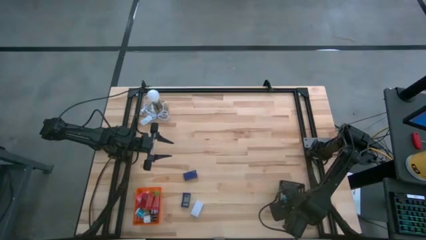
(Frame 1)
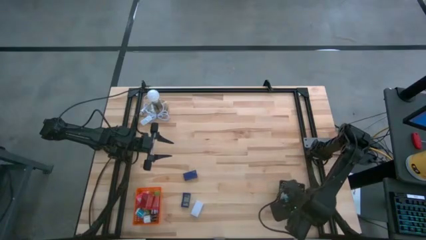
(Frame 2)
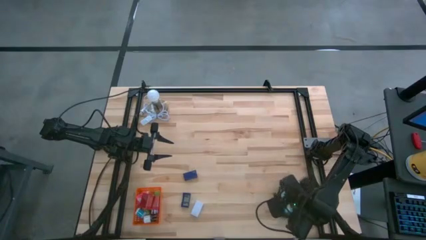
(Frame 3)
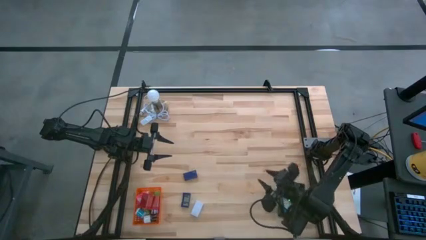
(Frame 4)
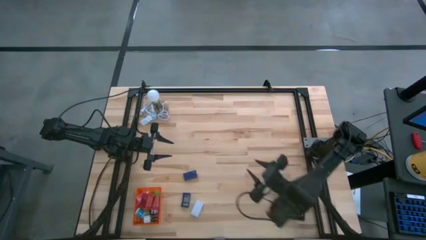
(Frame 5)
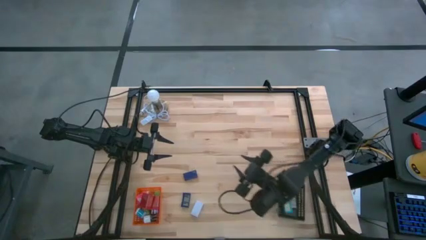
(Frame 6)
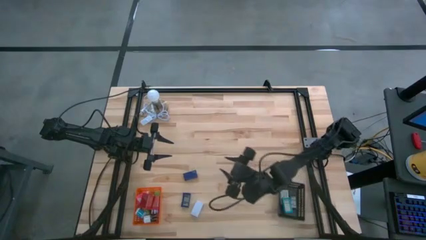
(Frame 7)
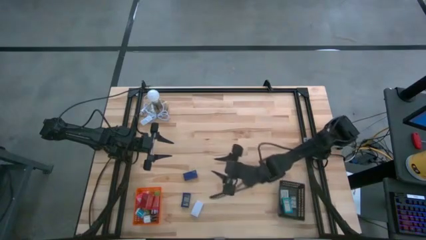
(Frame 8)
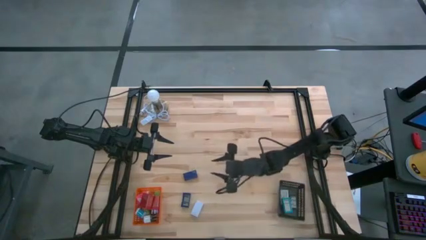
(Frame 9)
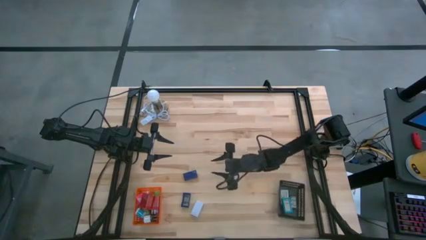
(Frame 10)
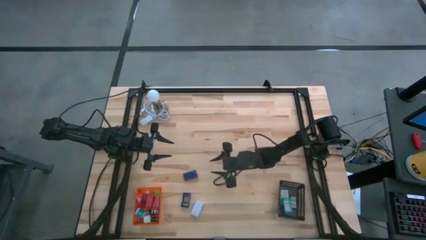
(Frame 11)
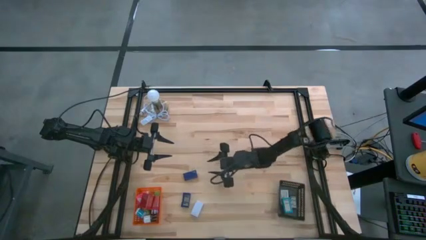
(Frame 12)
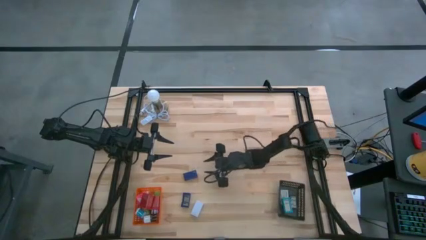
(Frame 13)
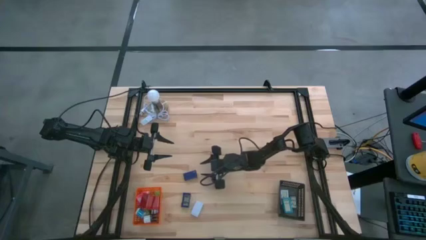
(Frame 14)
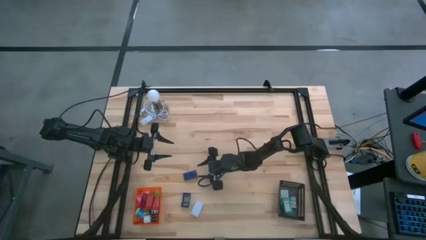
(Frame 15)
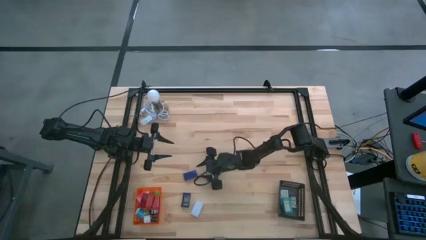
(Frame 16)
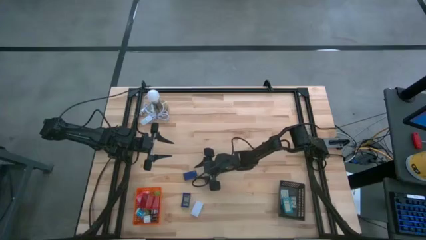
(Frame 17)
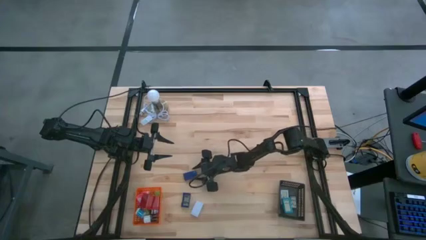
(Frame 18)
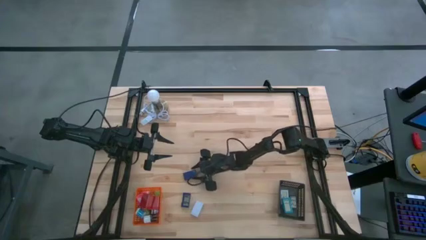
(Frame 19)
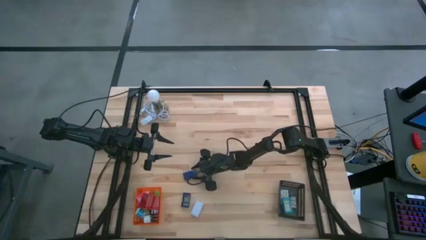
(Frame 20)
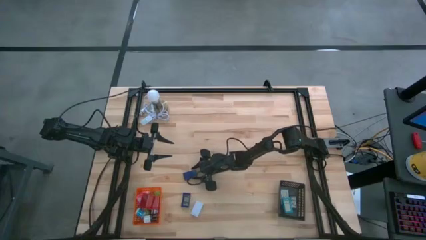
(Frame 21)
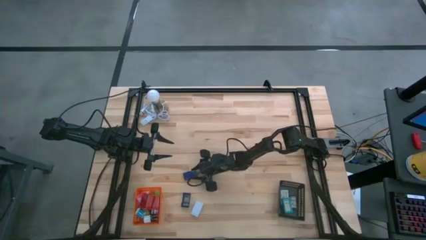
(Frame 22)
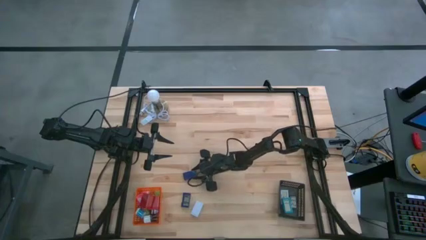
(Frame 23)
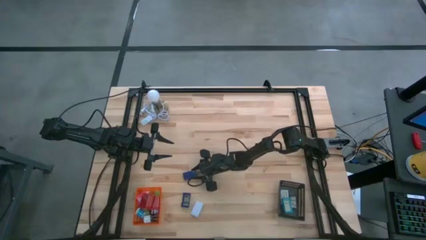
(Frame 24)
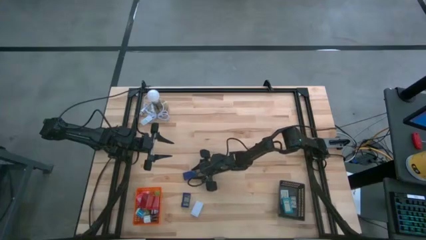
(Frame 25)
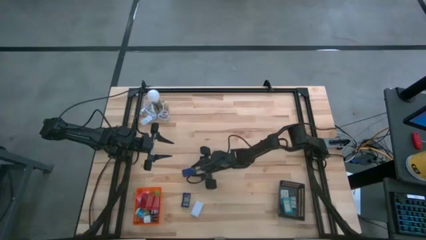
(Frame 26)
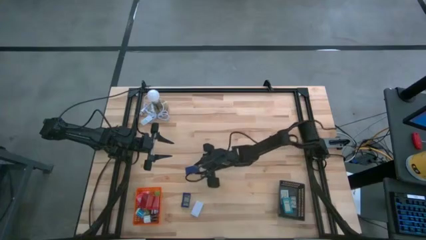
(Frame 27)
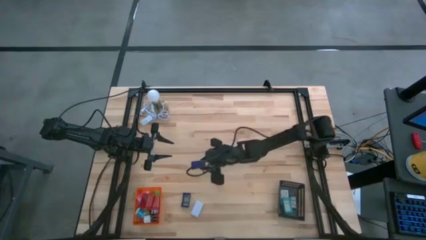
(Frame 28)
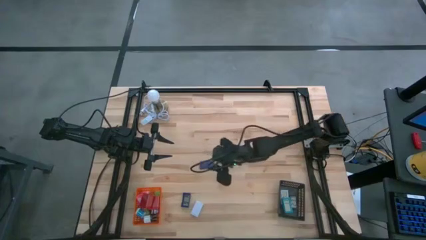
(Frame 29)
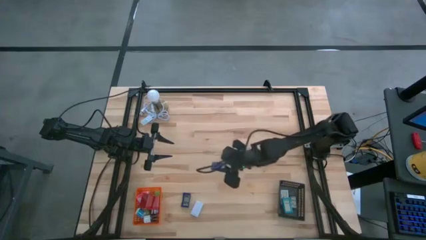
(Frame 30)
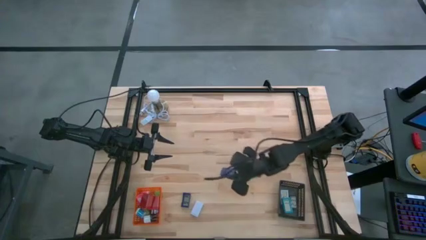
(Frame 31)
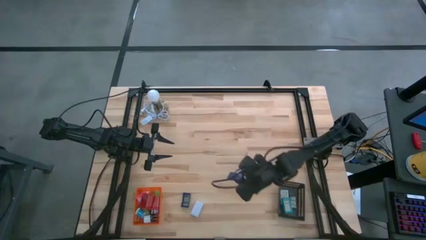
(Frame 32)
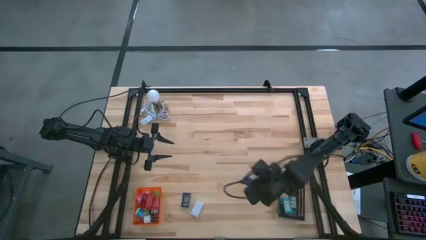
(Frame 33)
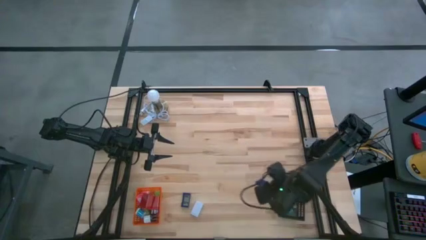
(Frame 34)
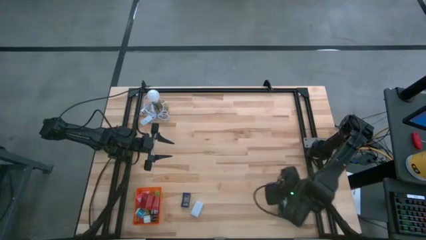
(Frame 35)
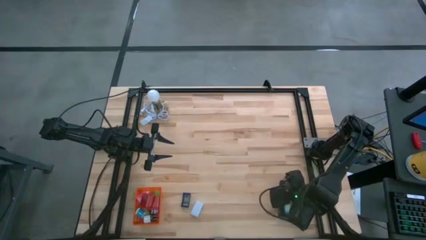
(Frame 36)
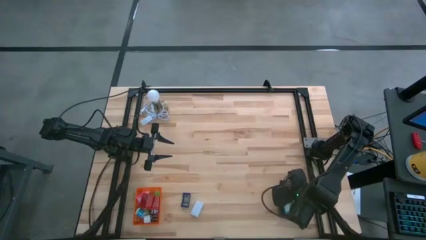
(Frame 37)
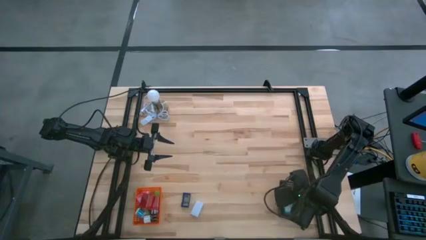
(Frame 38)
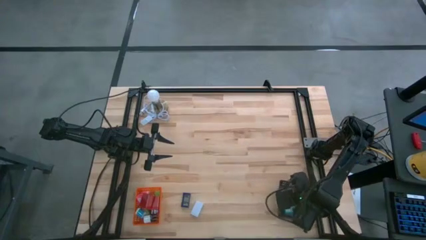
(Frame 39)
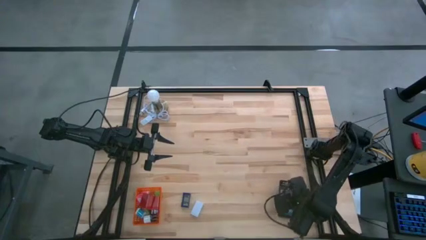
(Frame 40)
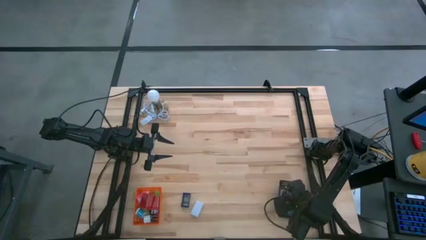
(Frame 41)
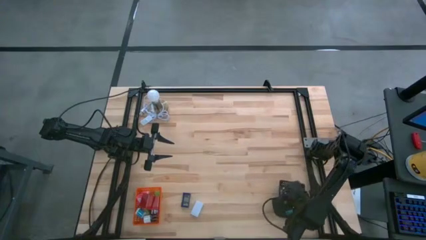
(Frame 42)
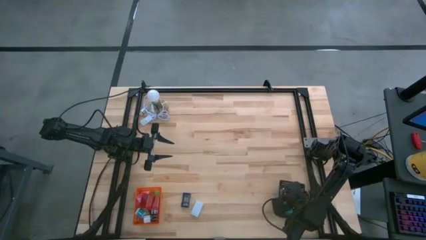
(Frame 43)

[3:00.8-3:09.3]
Task: Pick & Place Office items
Put the top blue digital clock into the black bin

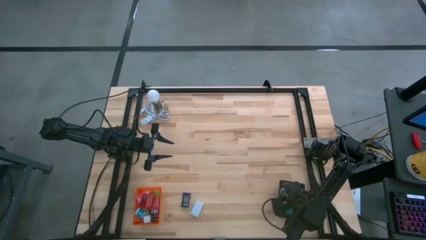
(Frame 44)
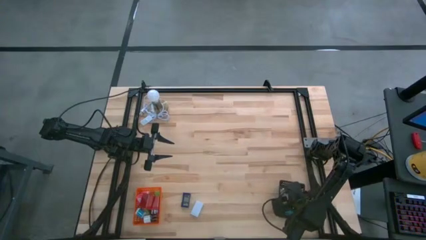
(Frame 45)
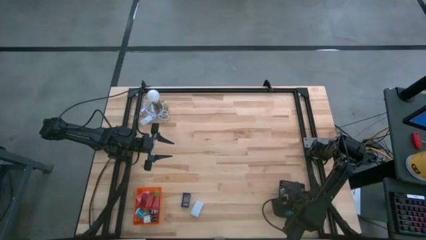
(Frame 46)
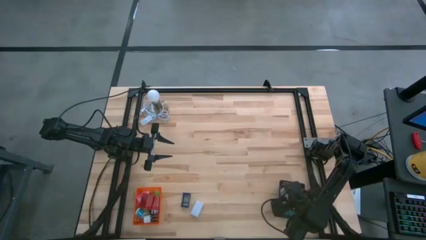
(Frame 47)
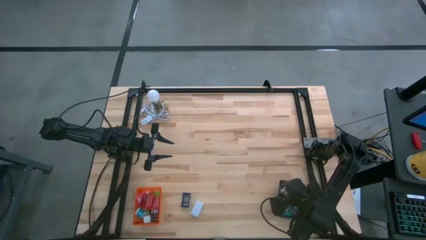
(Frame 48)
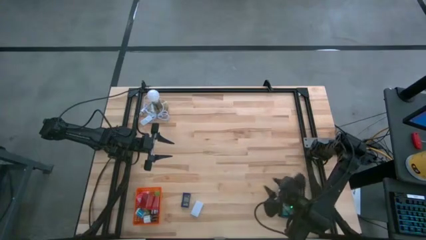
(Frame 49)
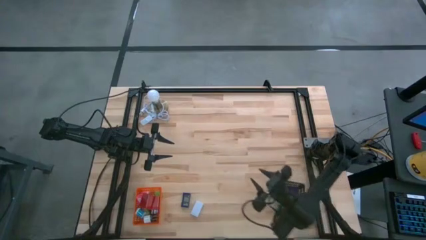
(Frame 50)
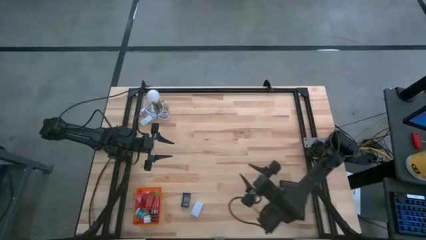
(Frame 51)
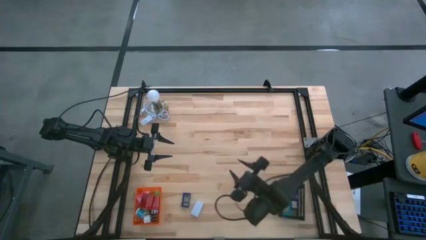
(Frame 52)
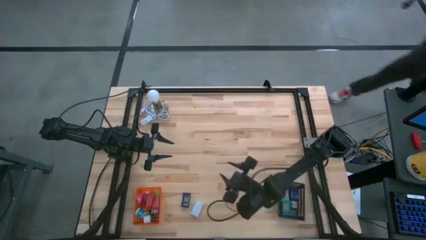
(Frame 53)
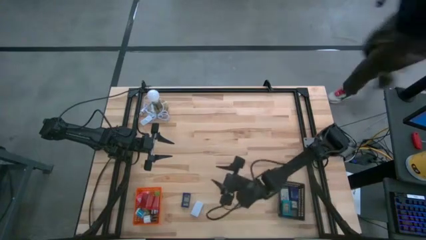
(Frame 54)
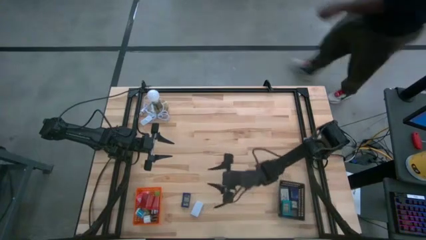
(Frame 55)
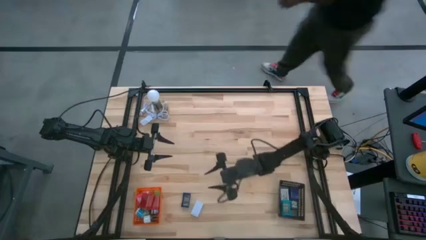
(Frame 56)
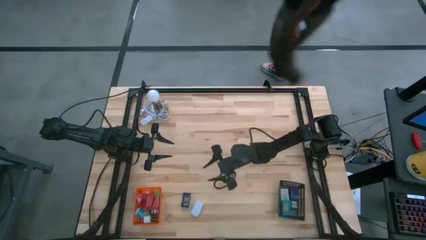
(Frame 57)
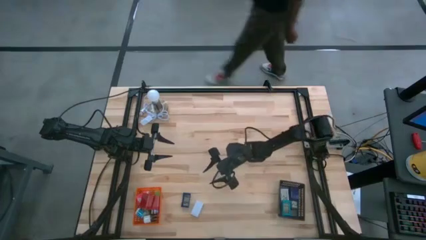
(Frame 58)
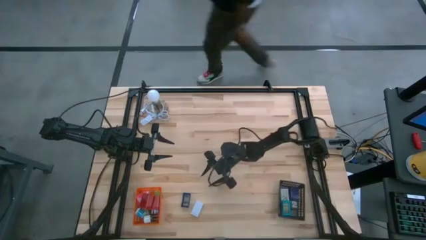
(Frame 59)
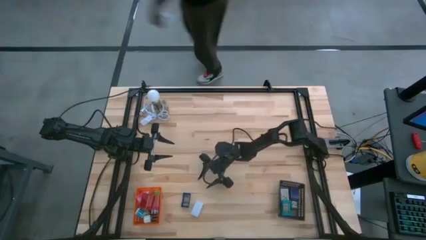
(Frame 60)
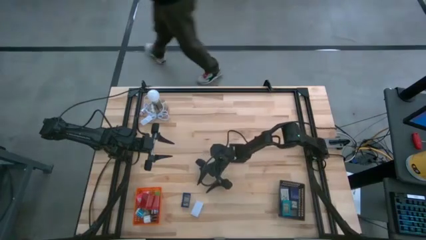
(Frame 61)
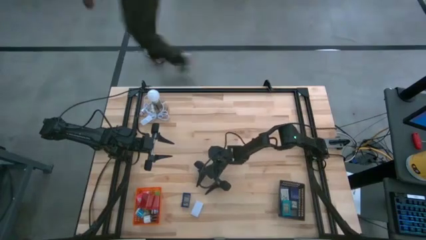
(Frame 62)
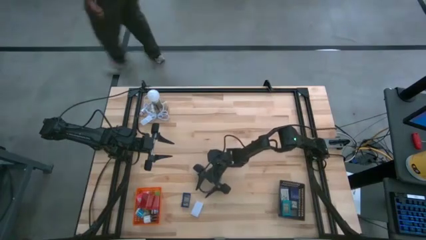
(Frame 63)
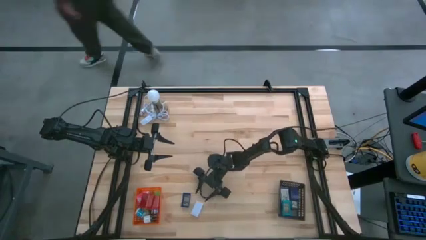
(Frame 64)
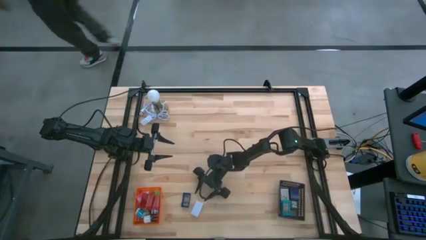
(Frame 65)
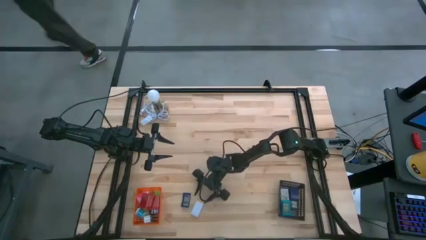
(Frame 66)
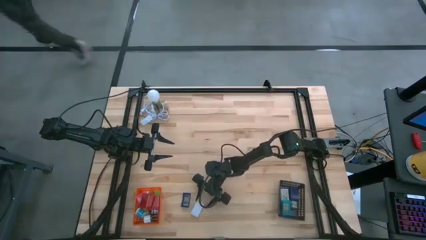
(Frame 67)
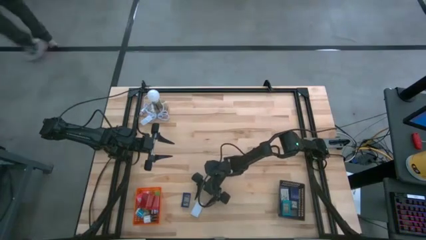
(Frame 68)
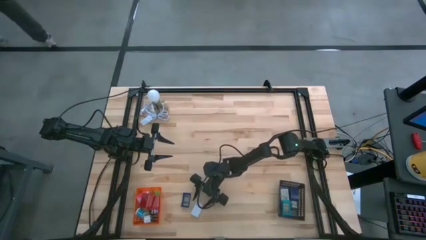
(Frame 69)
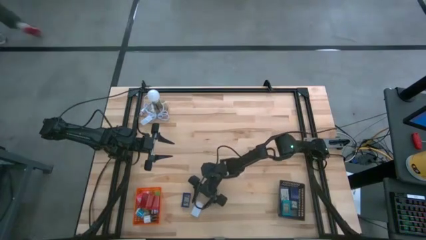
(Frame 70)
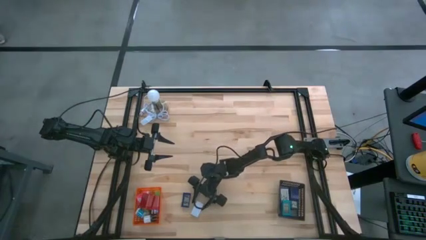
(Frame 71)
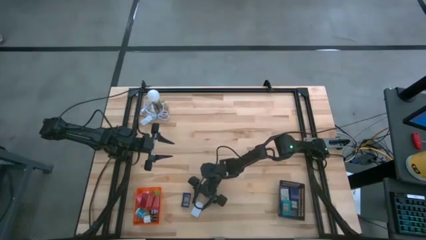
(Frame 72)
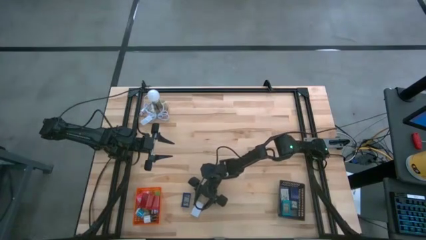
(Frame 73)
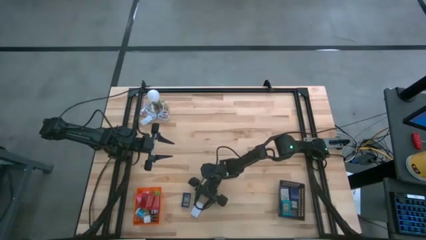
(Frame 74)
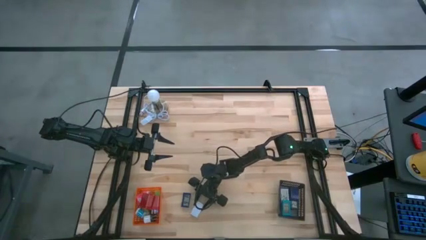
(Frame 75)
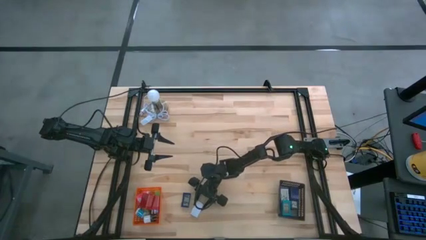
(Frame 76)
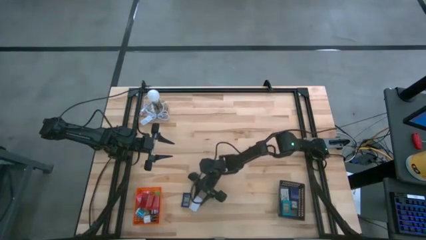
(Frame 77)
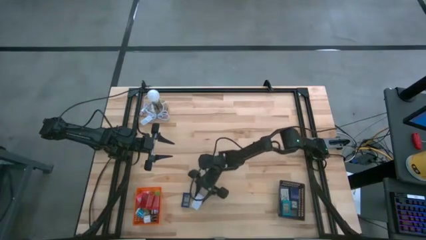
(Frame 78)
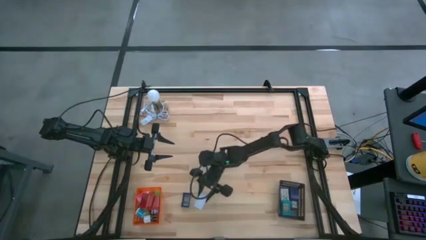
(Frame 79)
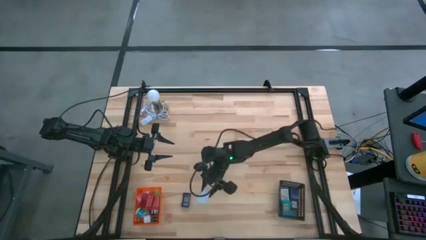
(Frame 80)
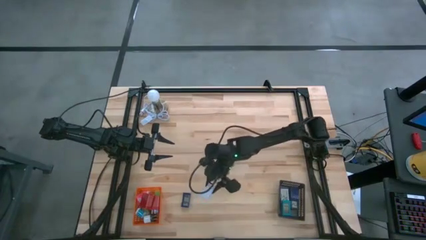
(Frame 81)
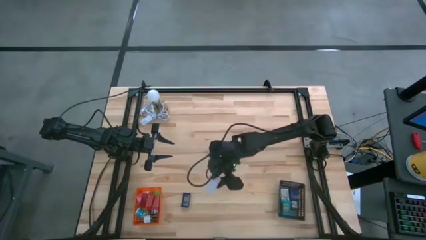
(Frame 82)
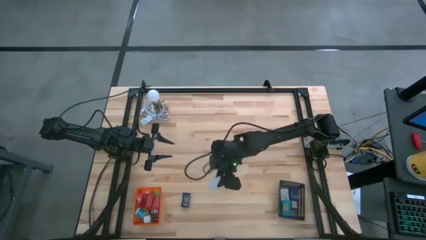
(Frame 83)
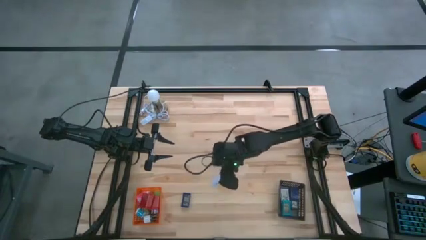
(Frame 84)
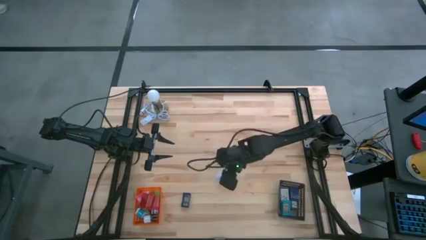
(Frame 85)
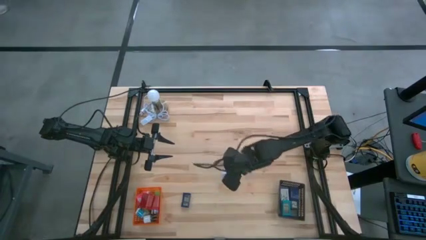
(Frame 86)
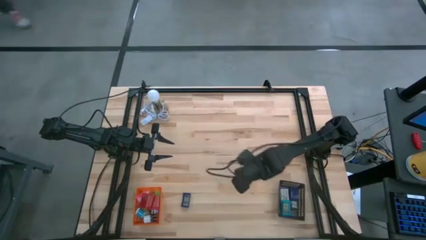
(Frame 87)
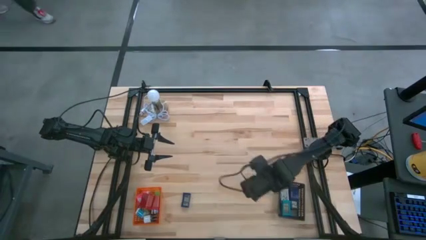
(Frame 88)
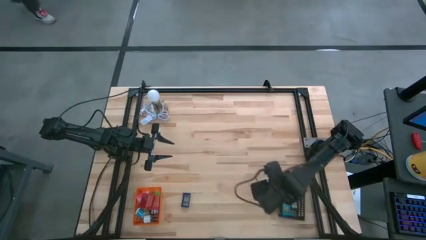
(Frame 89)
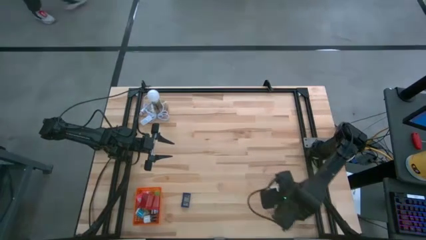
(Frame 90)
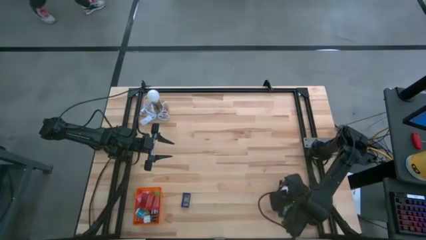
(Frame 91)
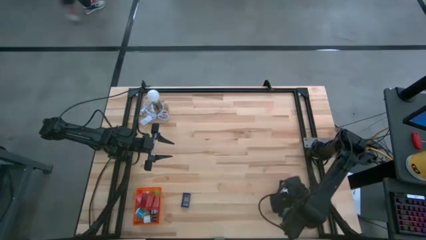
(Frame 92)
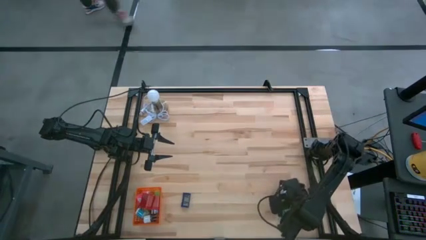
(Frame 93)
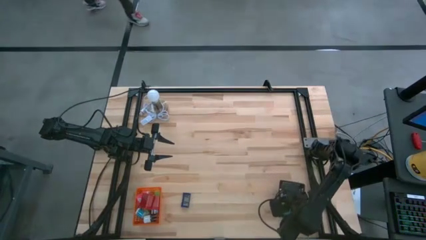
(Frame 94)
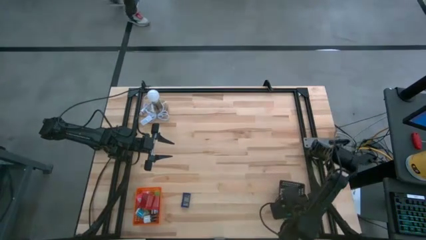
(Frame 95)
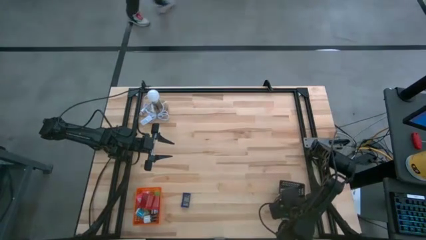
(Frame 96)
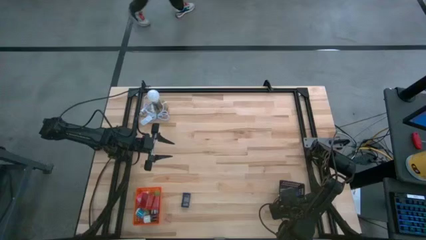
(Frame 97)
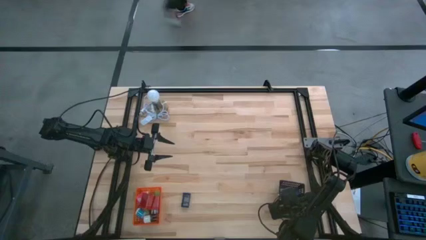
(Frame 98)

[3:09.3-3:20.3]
Put the white digital clock into the black bin
